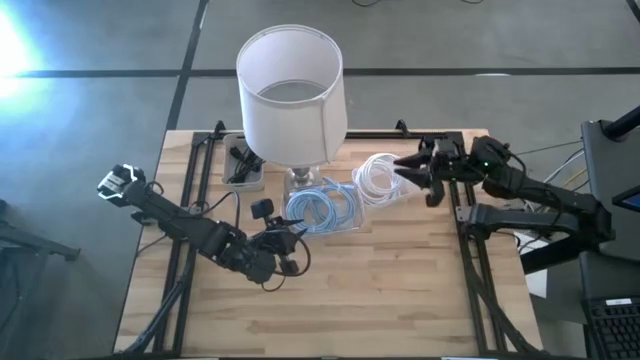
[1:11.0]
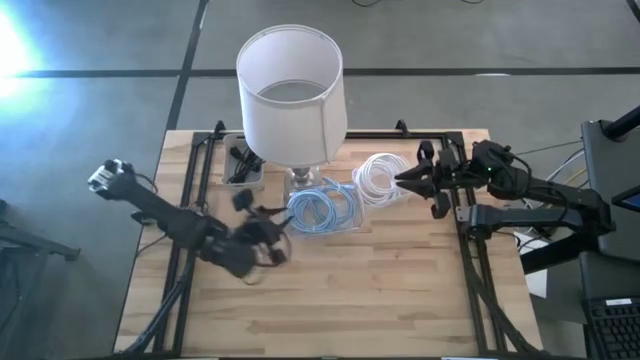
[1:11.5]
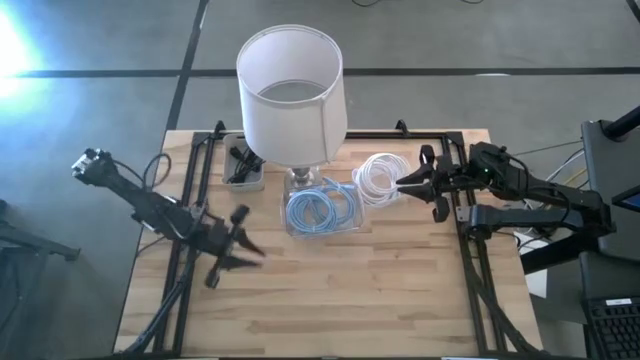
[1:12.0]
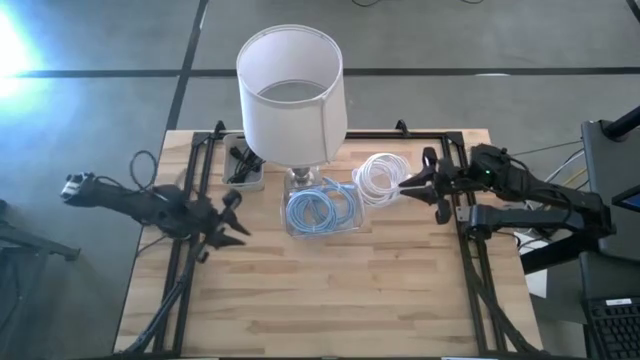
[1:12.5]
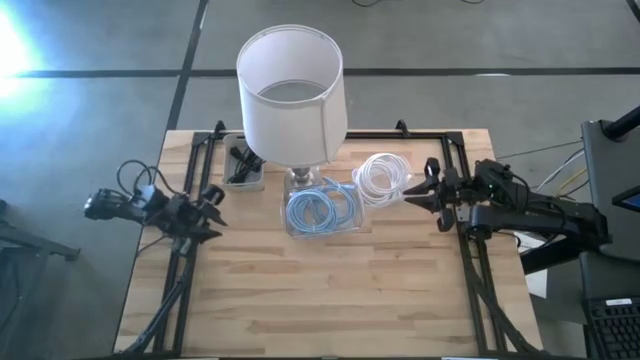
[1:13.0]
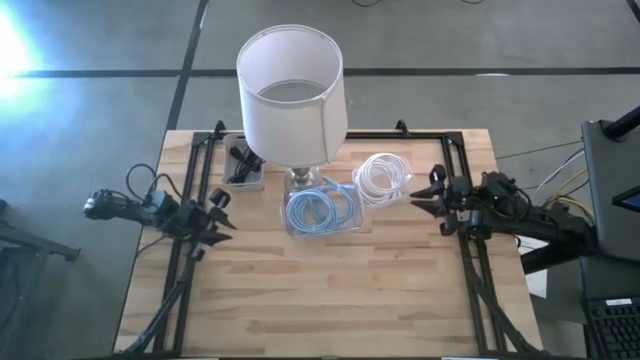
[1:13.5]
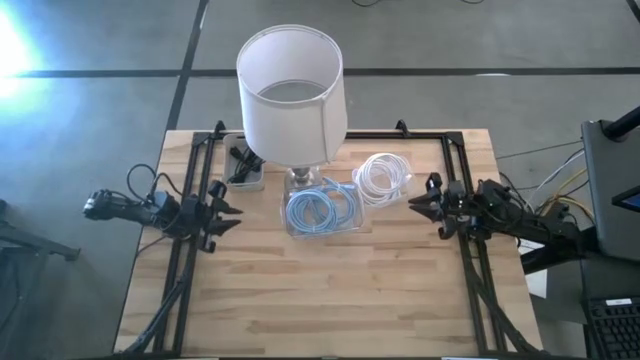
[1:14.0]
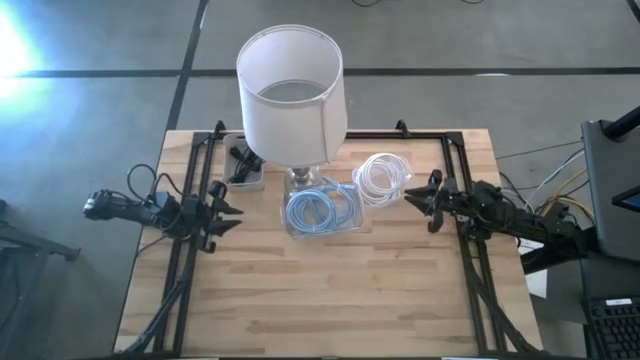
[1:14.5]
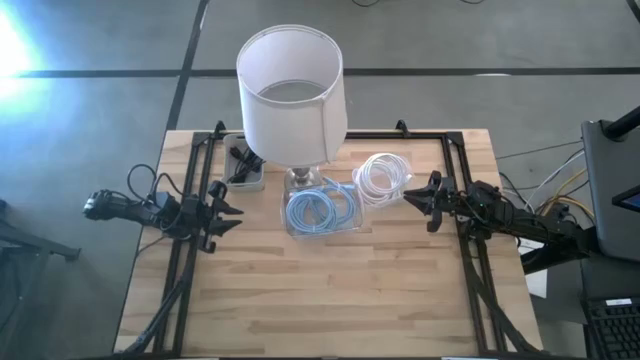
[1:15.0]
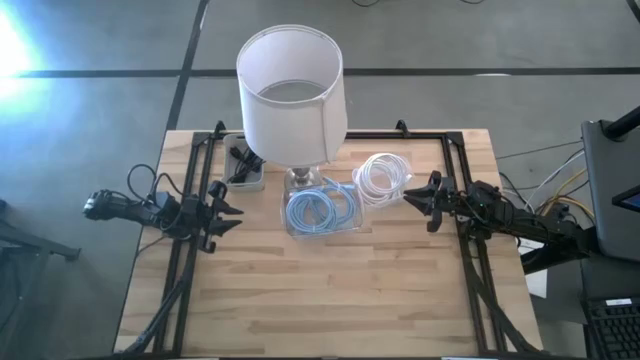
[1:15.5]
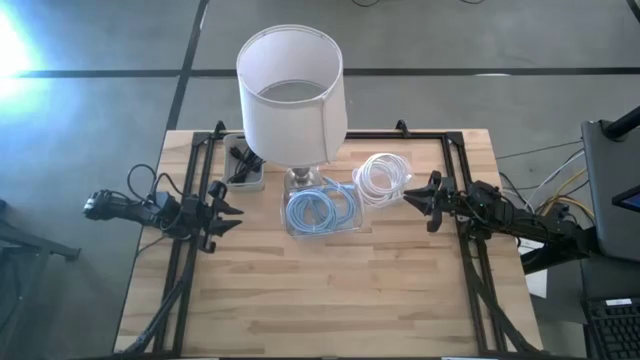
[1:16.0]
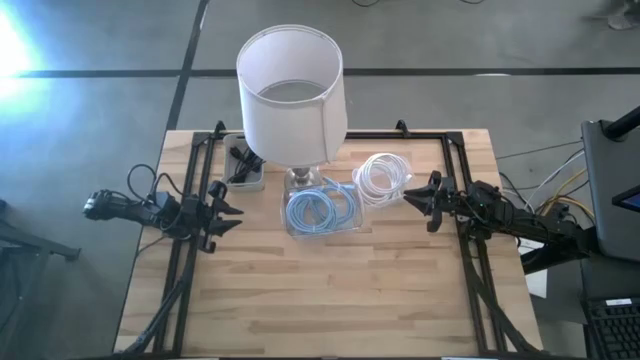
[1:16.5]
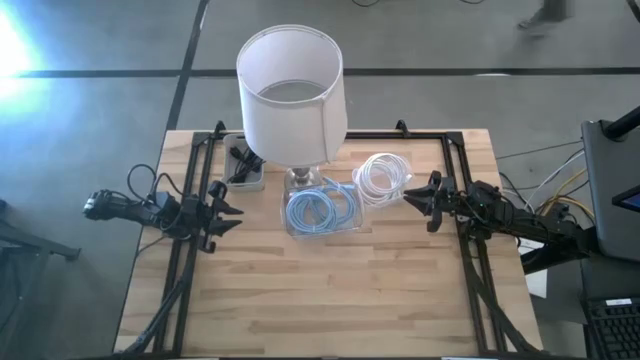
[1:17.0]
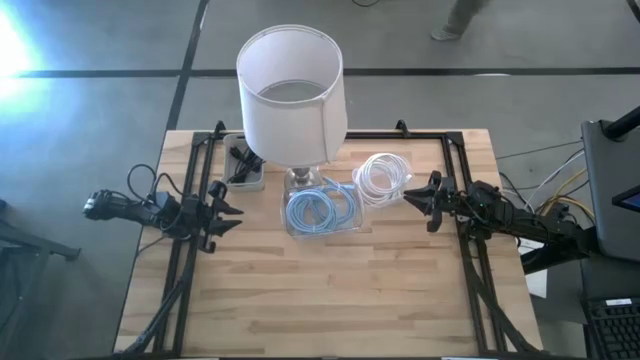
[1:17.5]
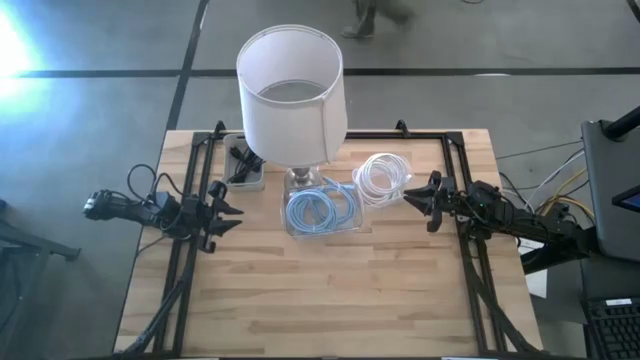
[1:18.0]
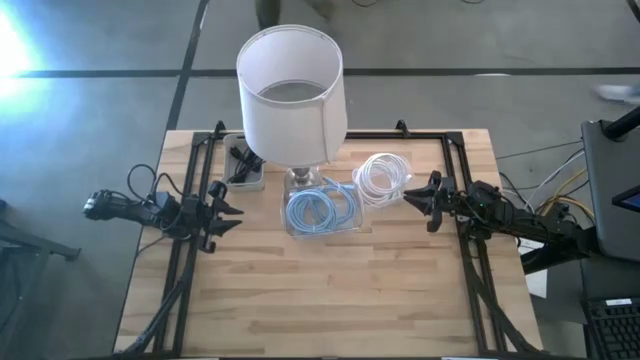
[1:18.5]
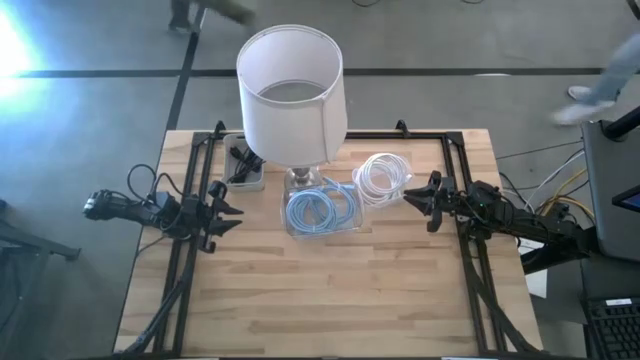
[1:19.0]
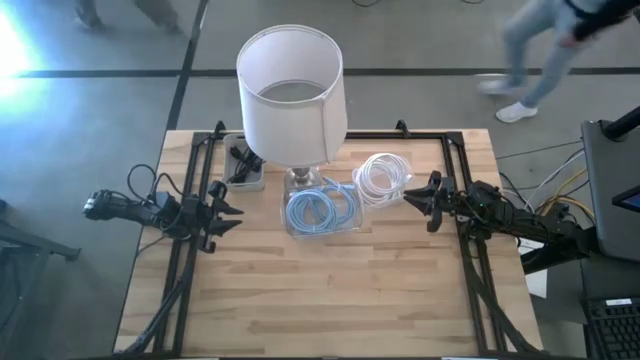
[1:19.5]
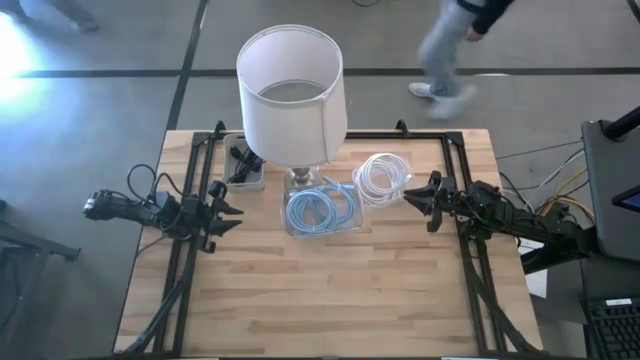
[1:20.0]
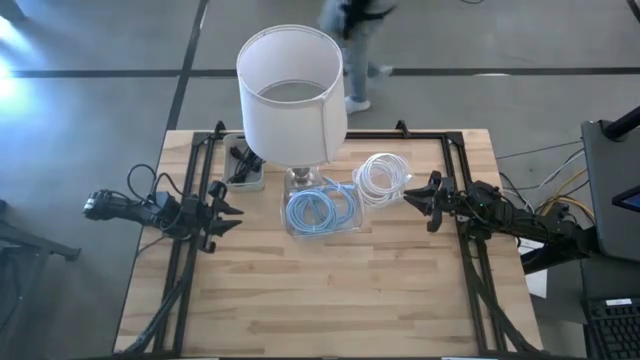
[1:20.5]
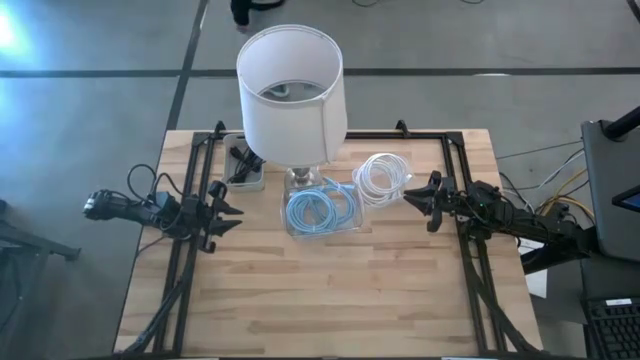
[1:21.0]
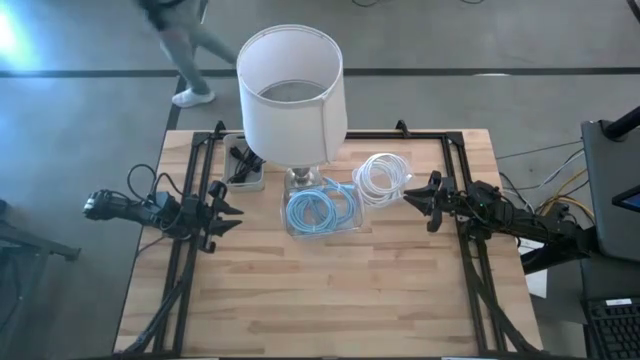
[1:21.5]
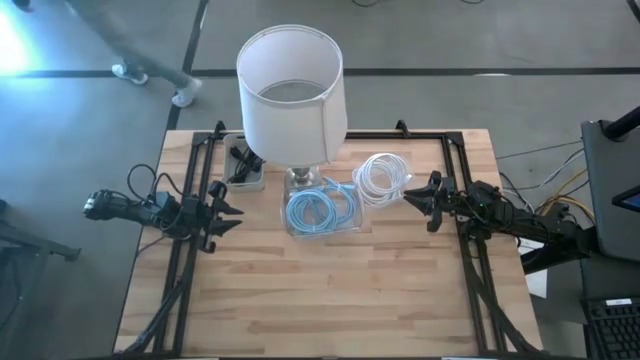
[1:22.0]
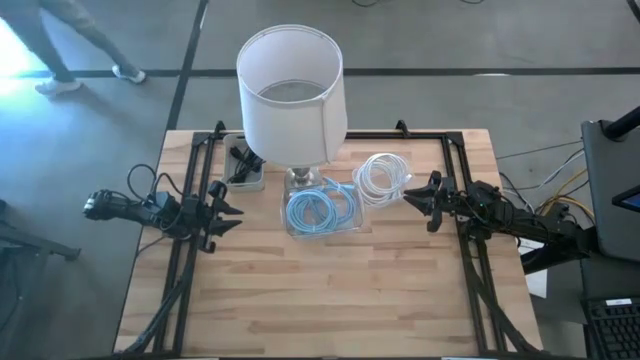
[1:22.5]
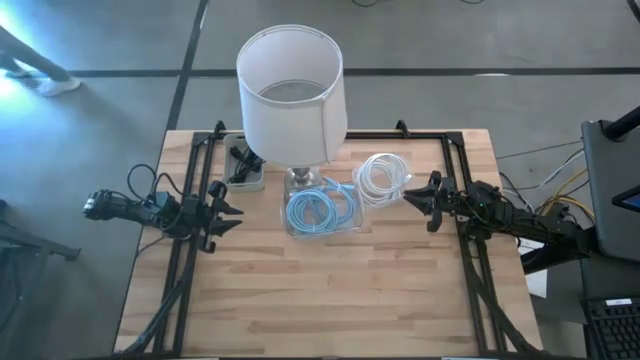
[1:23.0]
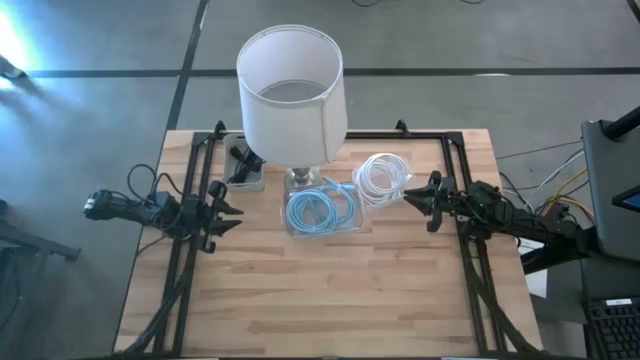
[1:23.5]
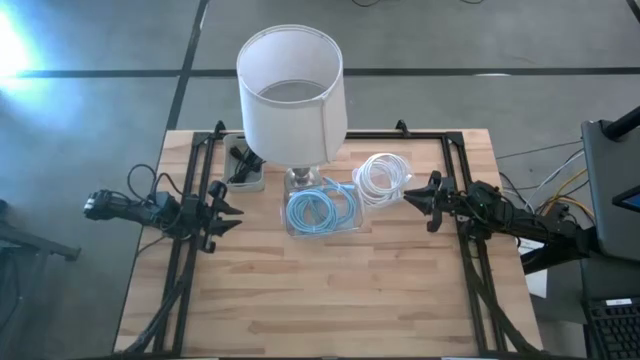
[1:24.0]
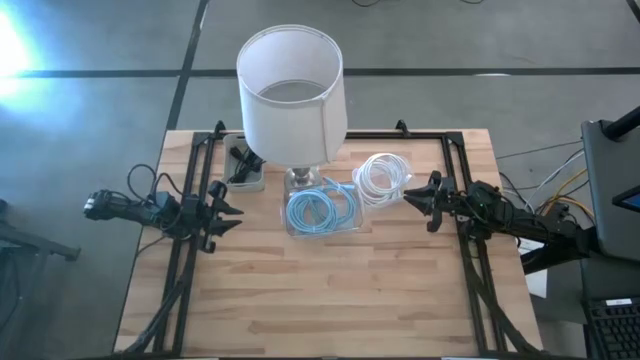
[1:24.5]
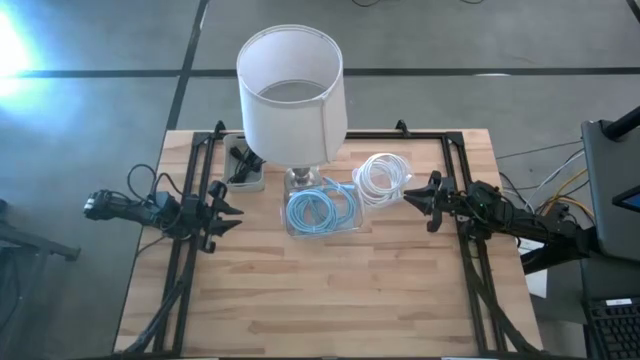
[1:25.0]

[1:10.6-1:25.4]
Task: Pick & Place USB Port
Return to Home Position

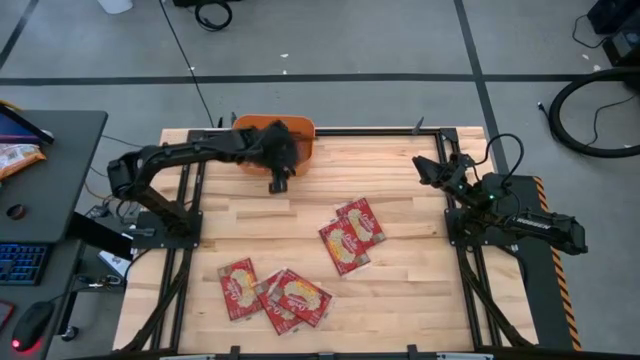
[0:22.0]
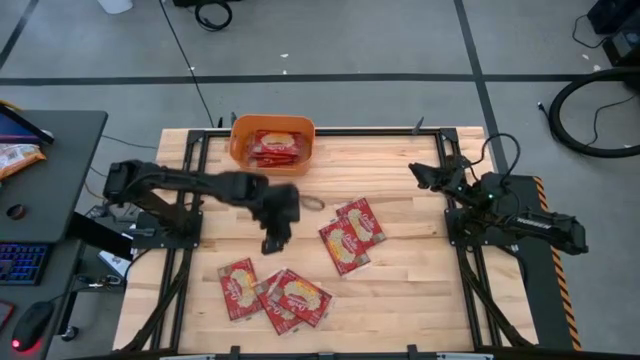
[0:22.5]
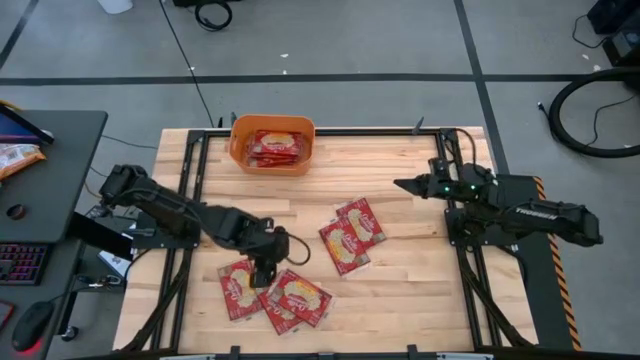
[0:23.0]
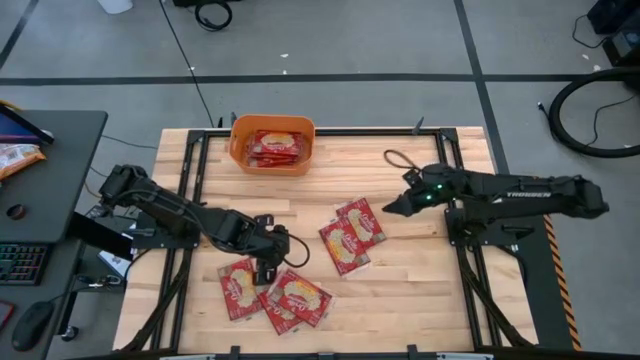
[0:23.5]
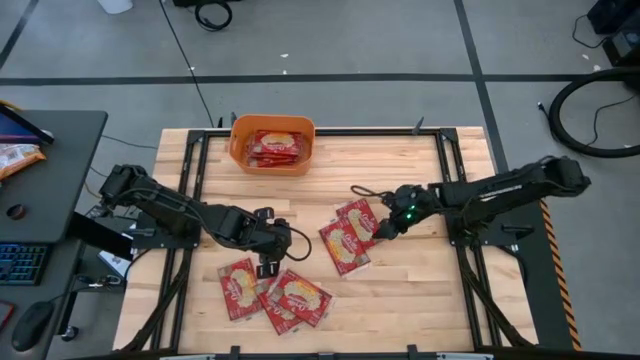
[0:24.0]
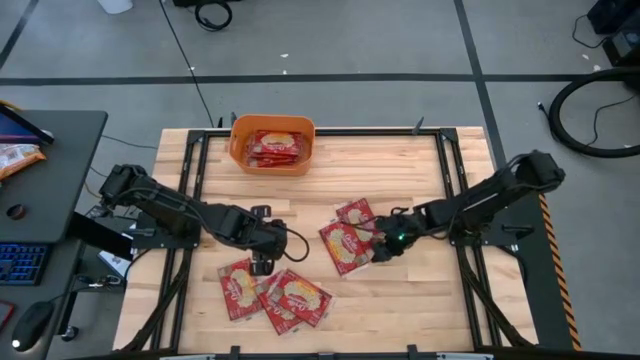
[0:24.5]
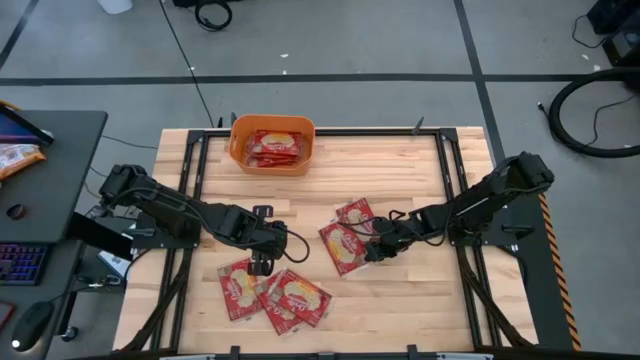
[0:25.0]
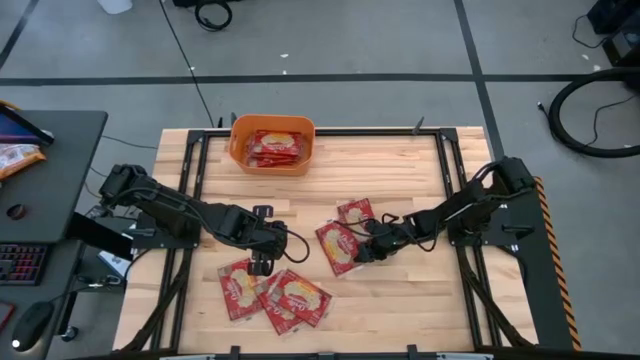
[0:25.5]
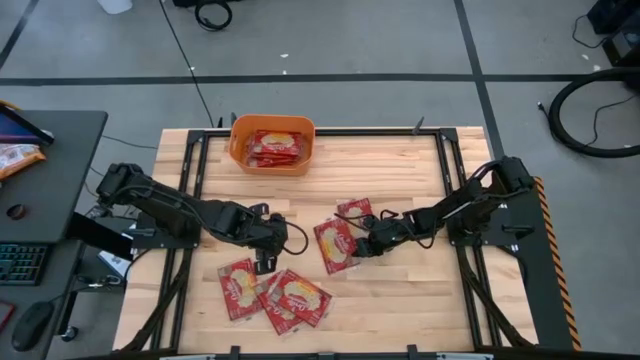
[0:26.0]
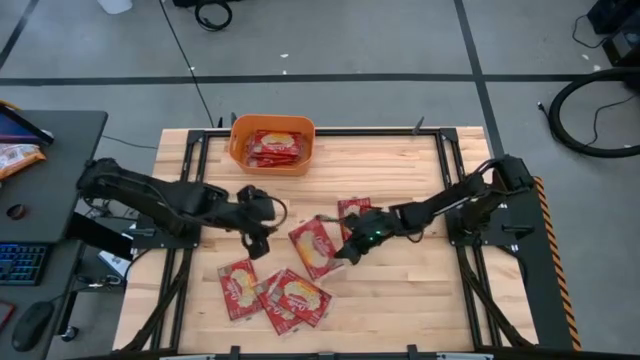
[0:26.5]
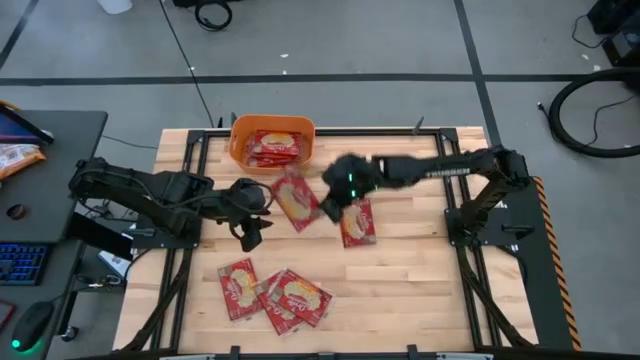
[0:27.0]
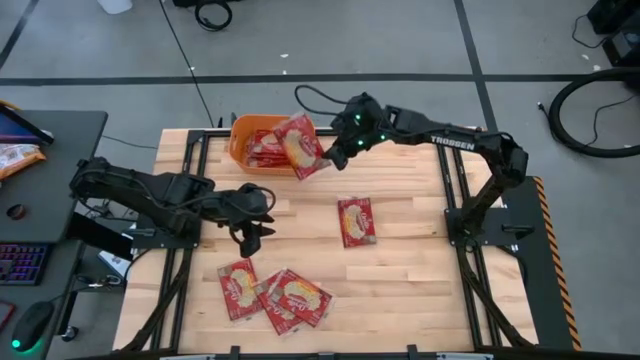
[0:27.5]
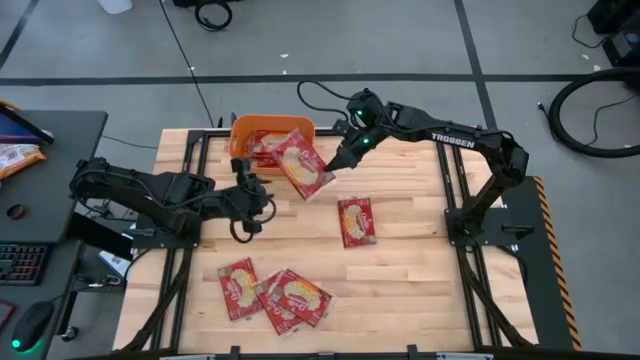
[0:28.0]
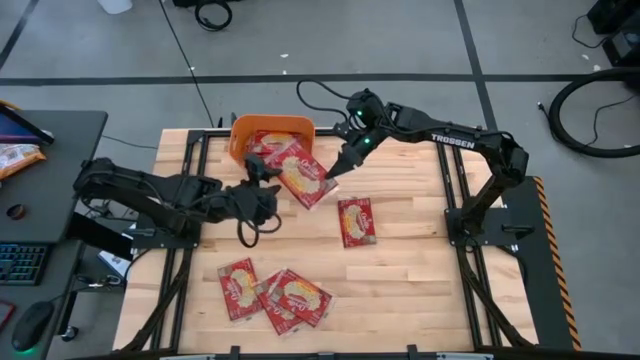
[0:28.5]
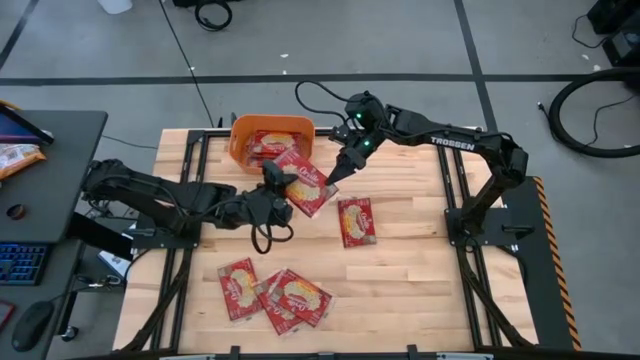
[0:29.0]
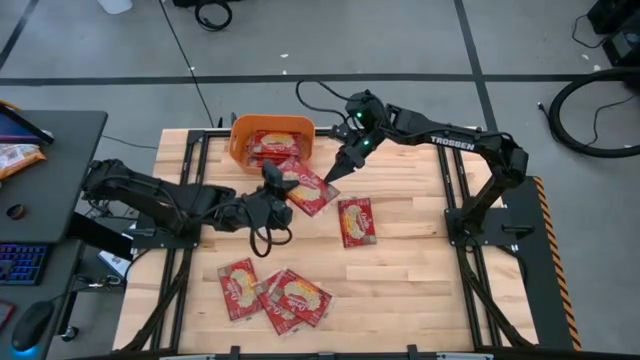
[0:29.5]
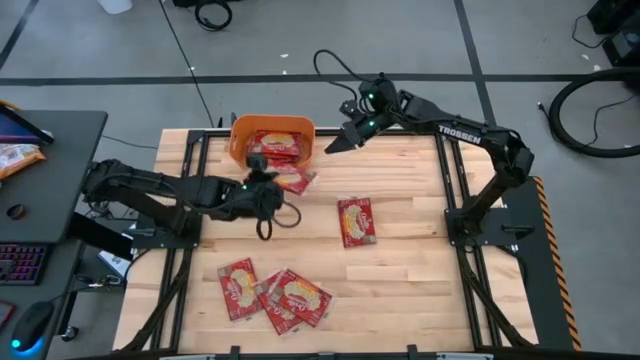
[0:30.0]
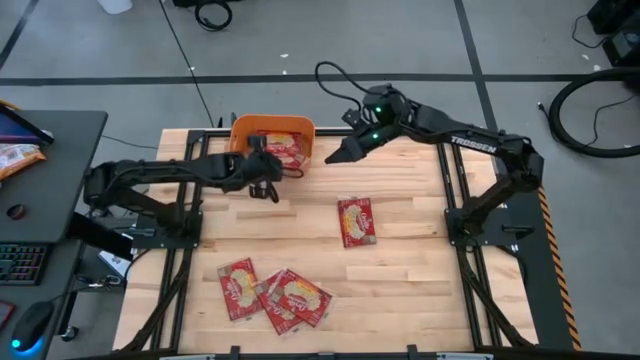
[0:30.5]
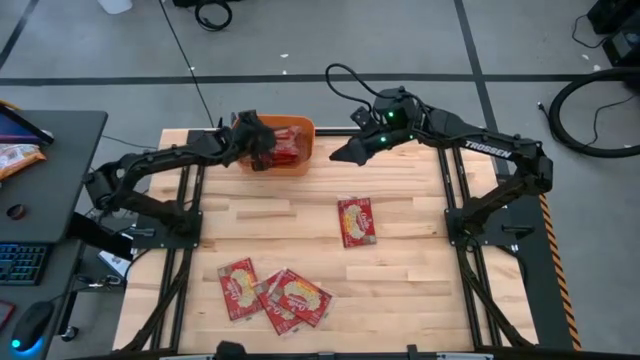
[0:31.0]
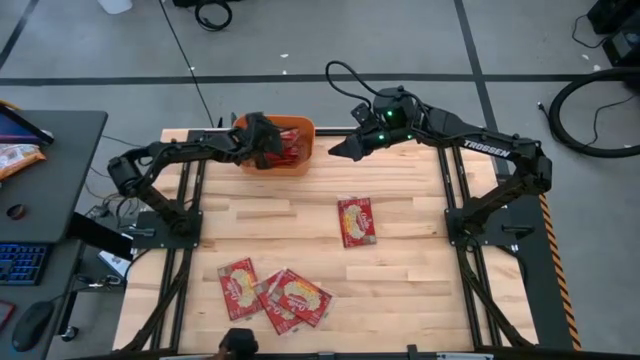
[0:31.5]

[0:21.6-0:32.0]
Task: Sort popcorn bags into baskets
Put the popcorn bag into the orange bin
